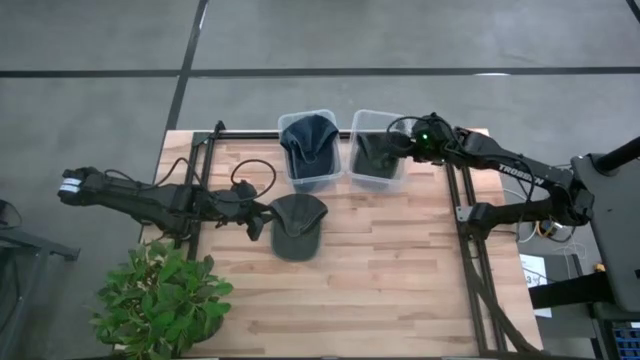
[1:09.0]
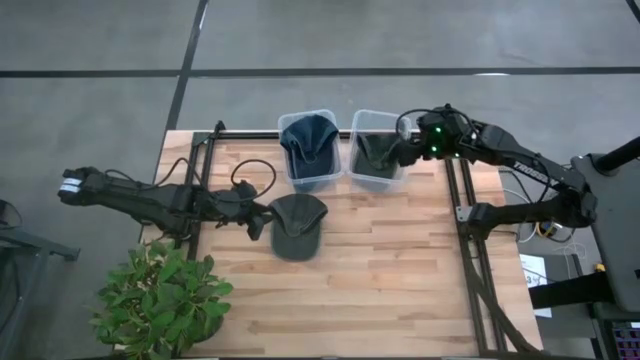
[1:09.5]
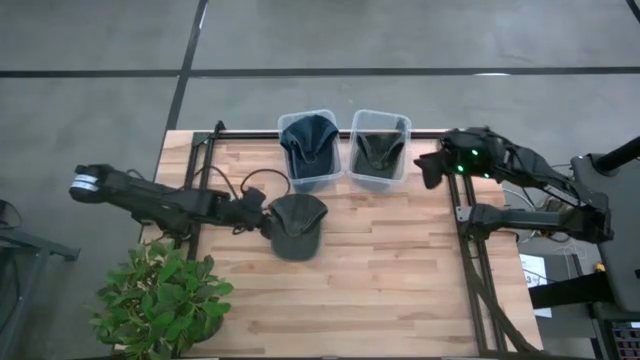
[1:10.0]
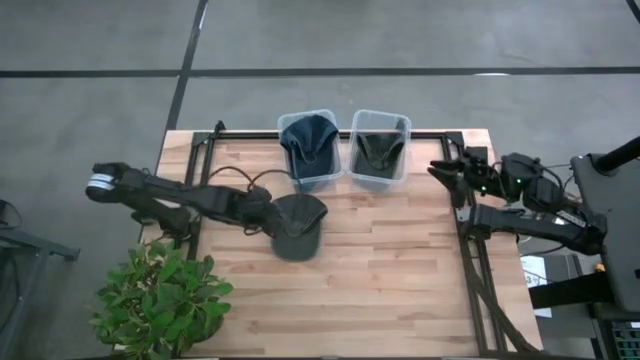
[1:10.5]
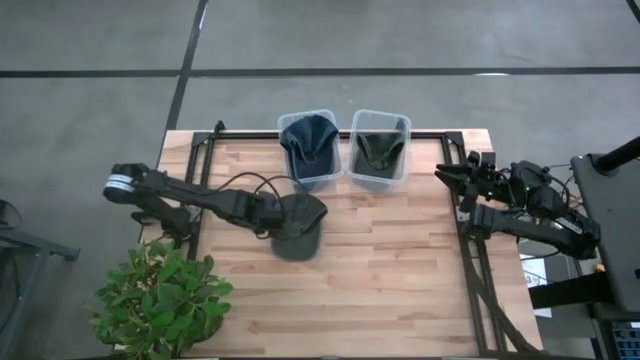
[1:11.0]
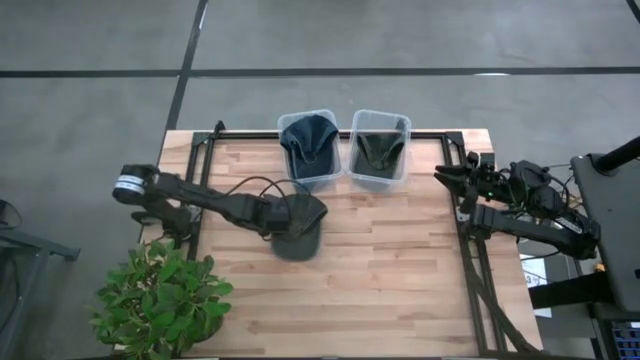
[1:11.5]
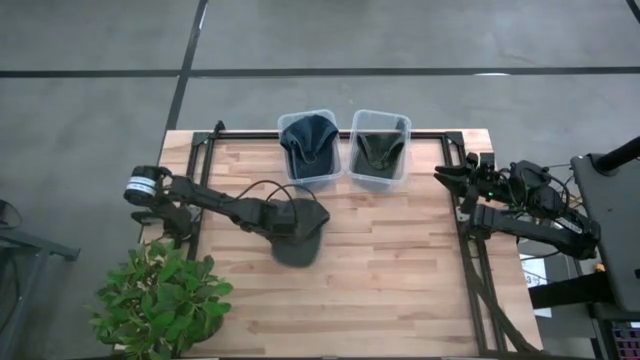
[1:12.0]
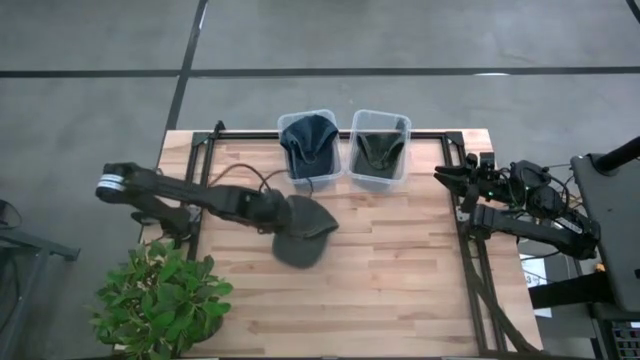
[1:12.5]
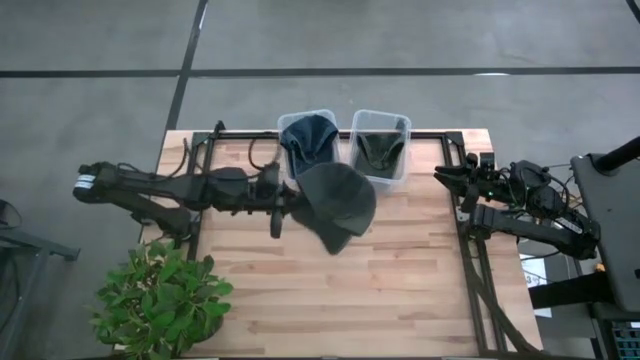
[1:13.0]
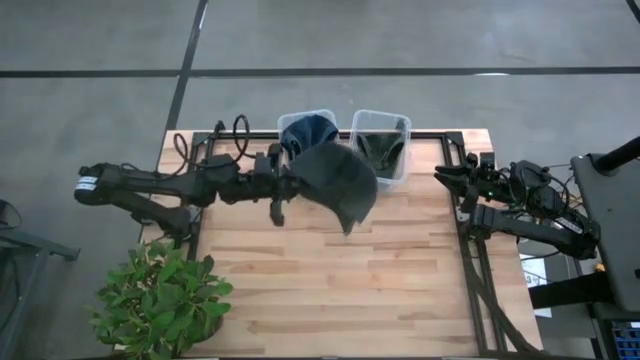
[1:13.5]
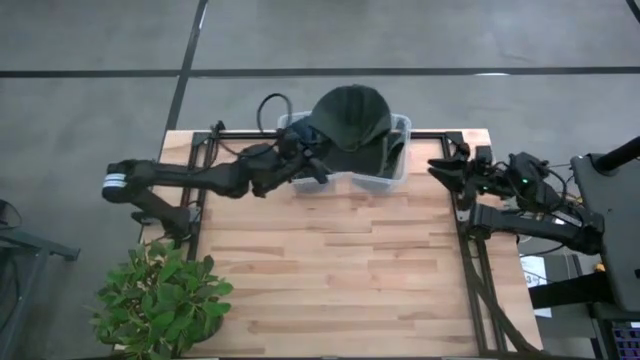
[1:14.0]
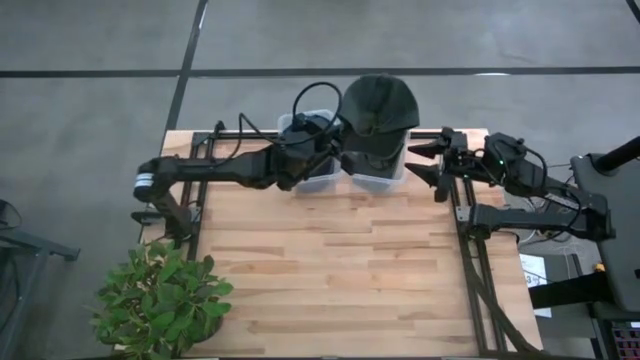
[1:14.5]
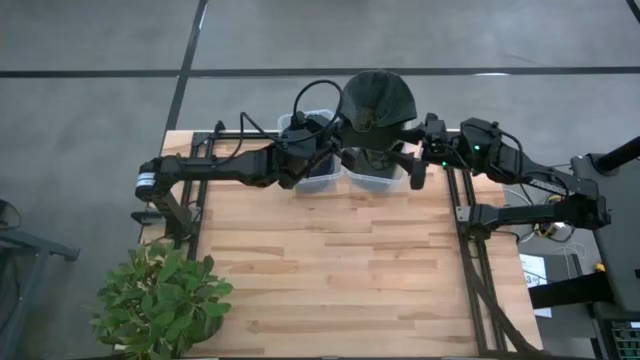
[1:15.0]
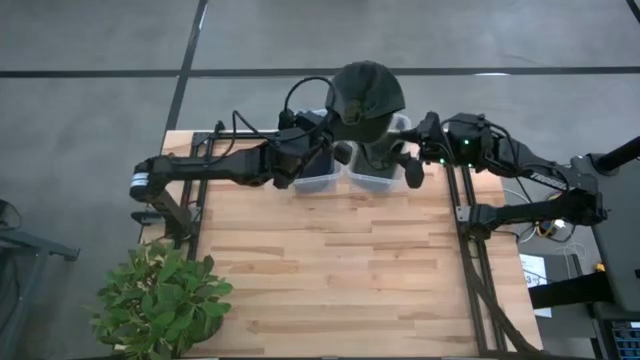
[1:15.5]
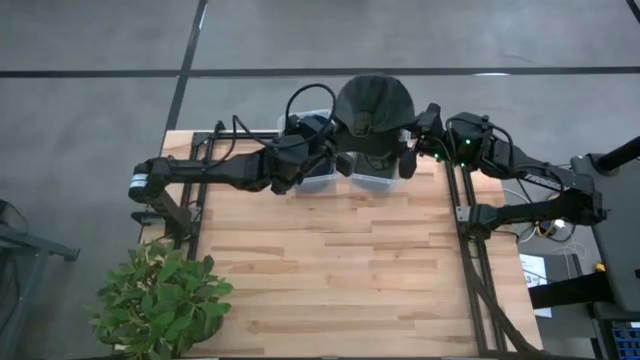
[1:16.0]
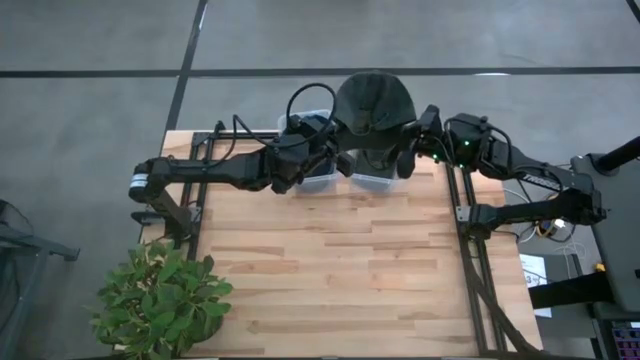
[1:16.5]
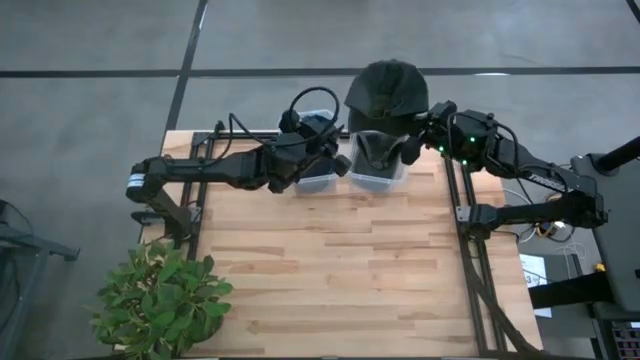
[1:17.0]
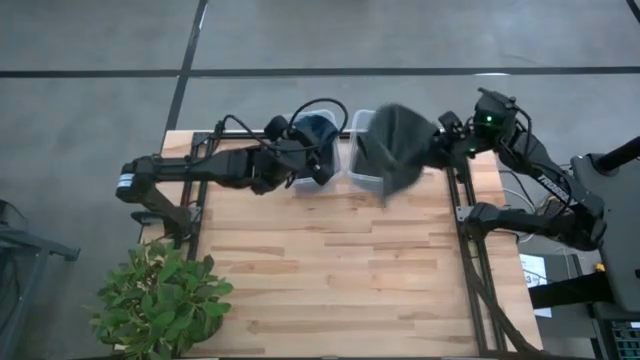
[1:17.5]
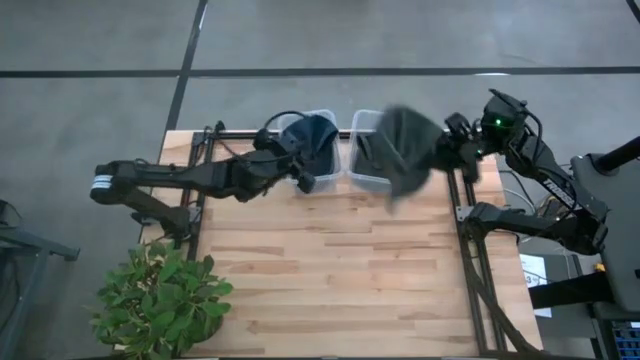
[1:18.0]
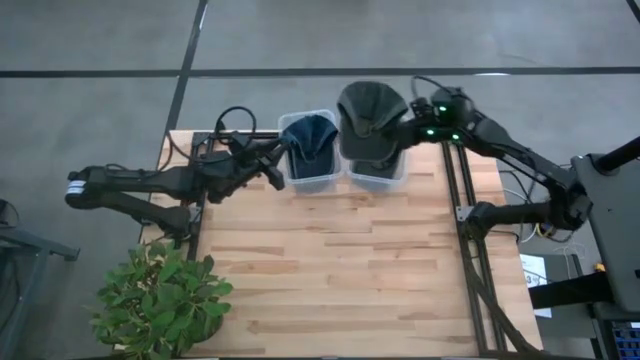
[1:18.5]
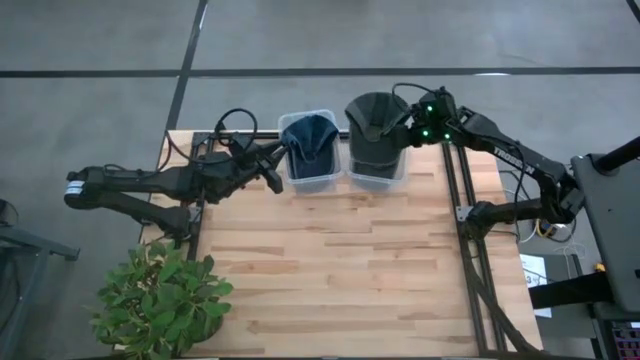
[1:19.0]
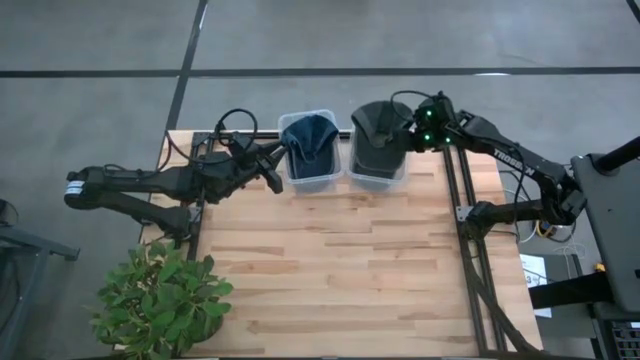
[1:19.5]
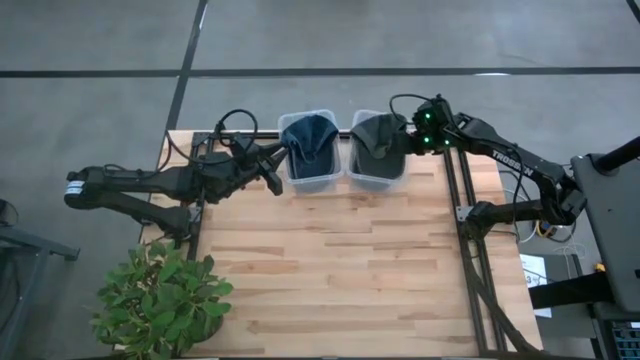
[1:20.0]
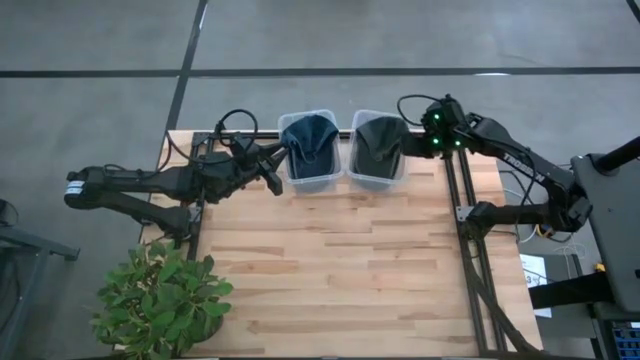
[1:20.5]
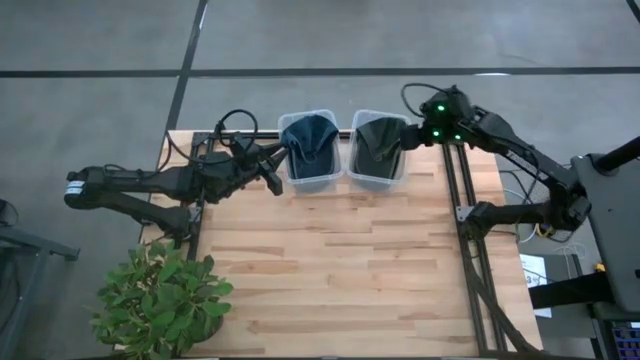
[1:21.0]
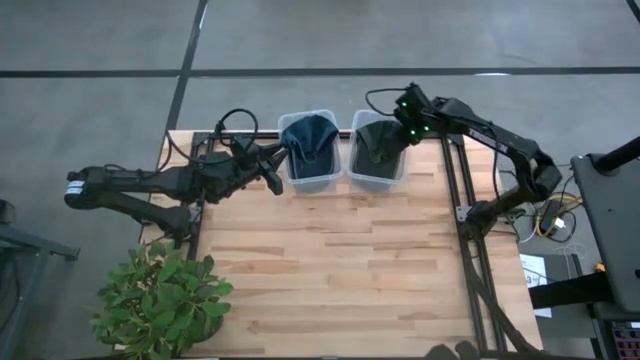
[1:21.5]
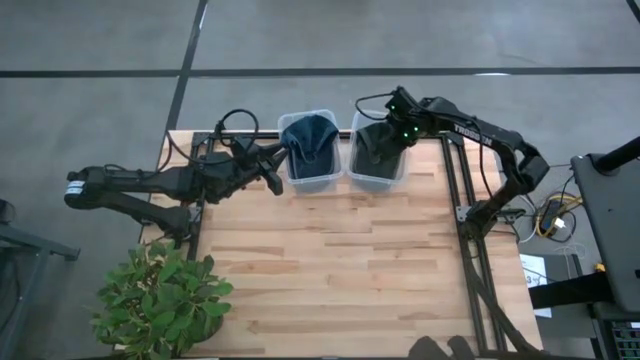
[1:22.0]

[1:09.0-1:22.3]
Task: Pick & Place hat
Put the gray cap into the transparent bin

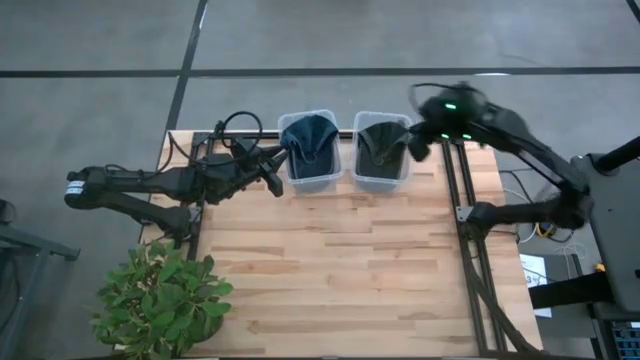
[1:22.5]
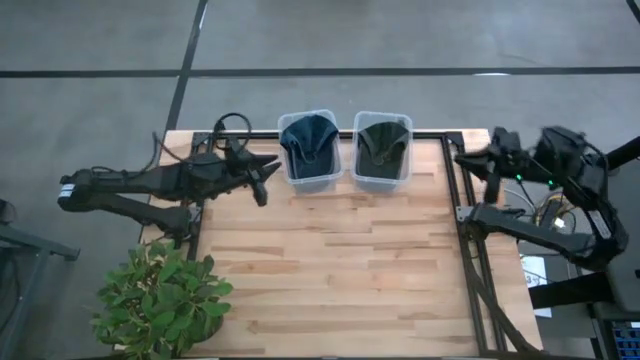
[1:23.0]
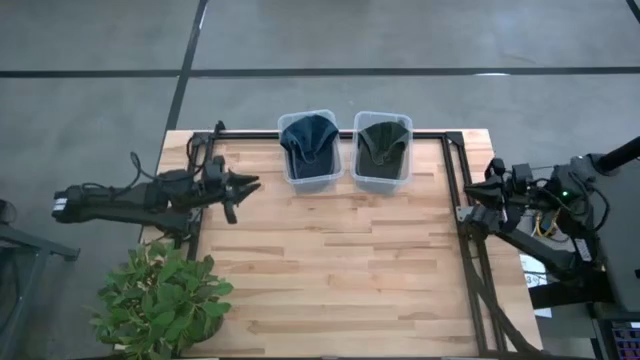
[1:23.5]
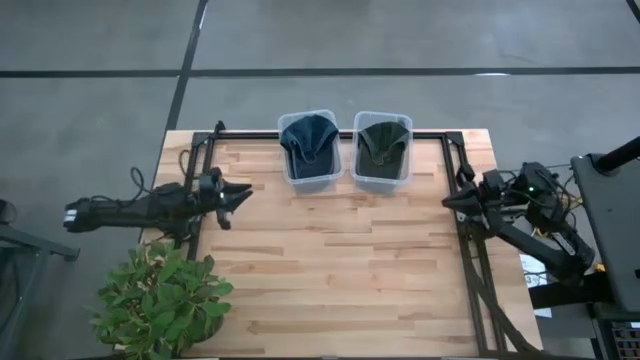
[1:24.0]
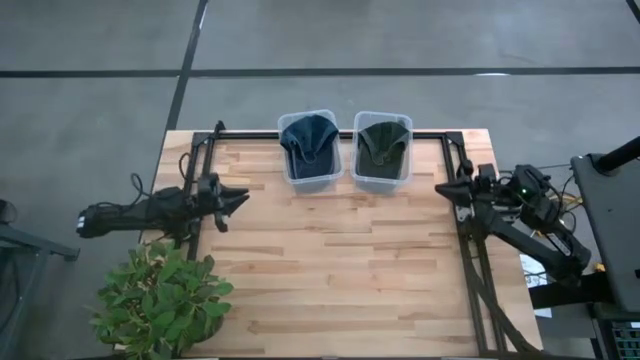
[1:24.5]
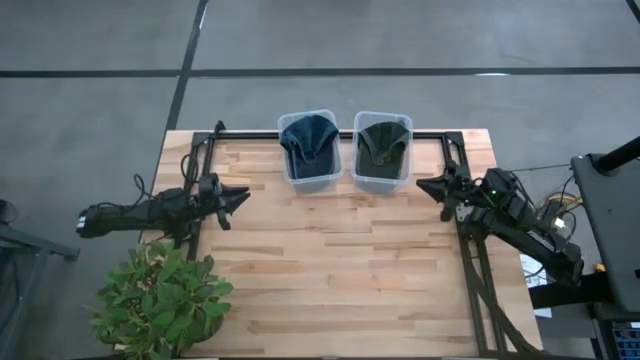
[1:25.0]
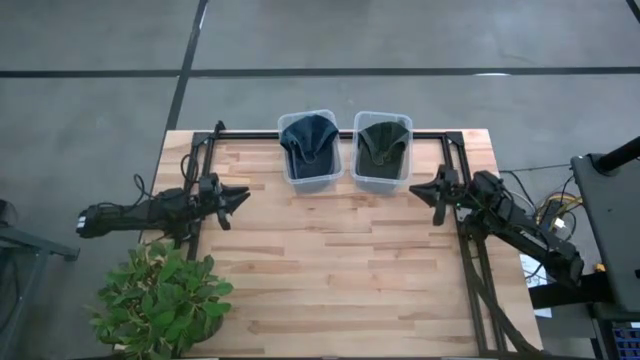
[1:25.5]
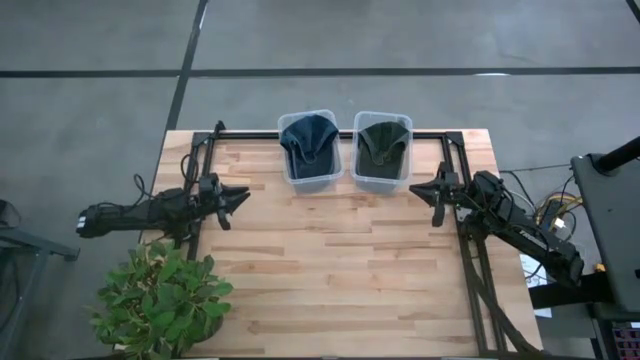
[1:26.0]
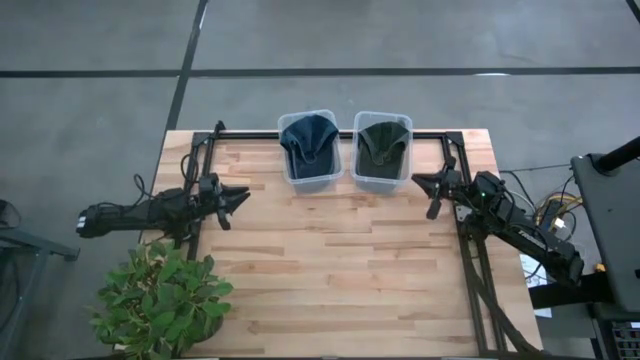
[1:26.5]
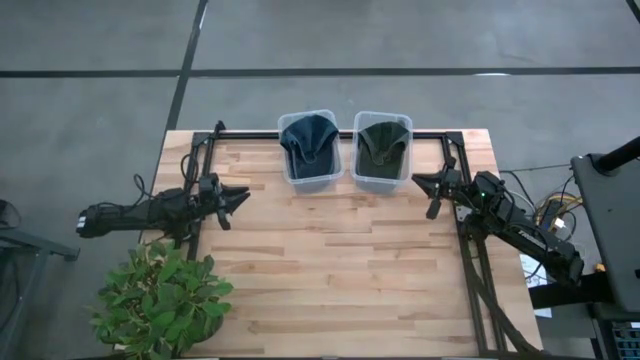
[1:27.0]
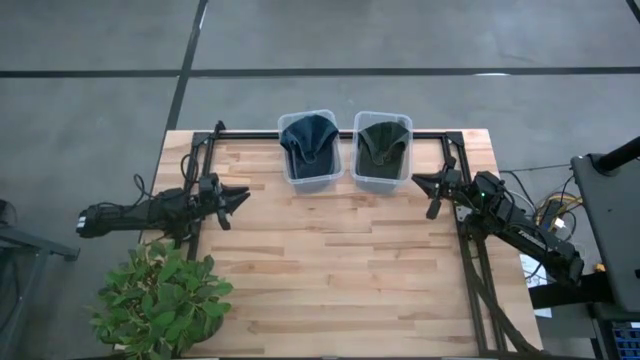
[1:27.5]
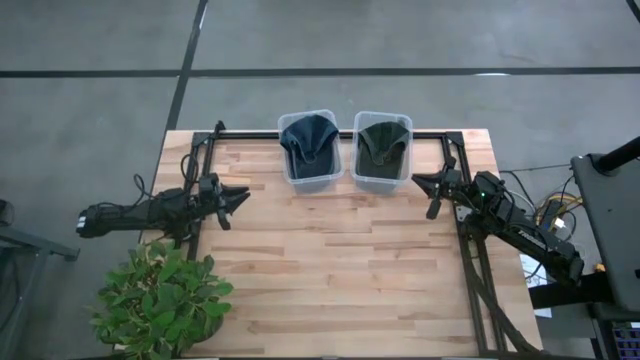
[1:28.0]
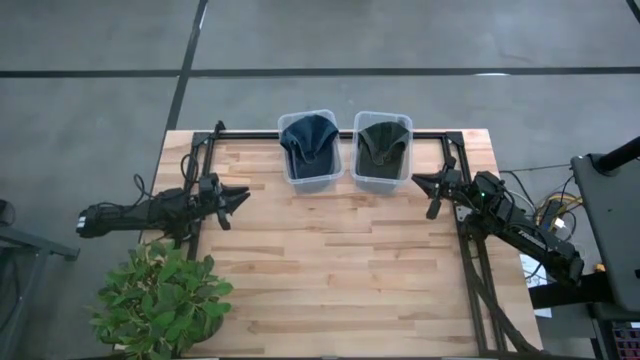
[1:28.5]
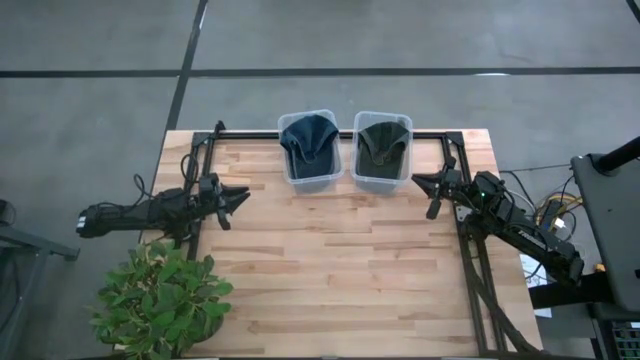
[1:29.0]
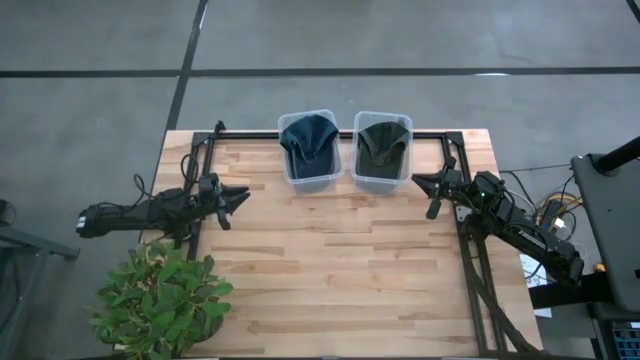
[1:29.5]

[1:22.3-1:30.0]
Return to Home Position

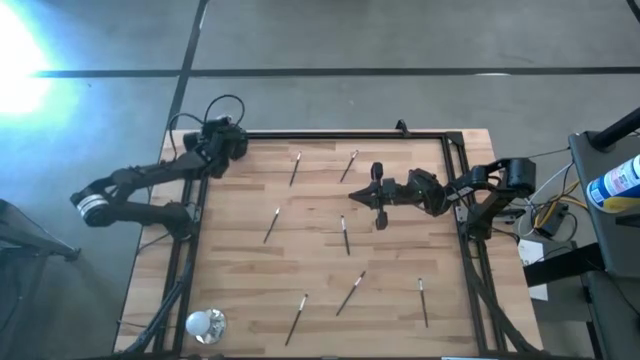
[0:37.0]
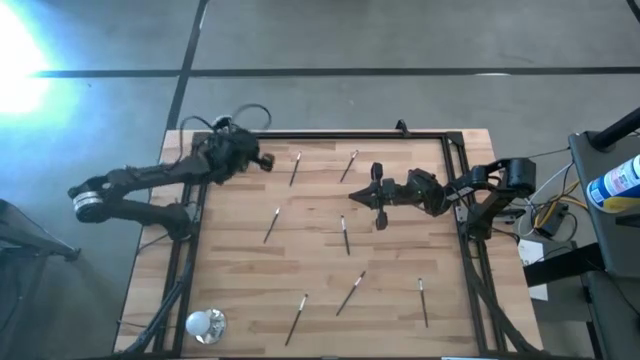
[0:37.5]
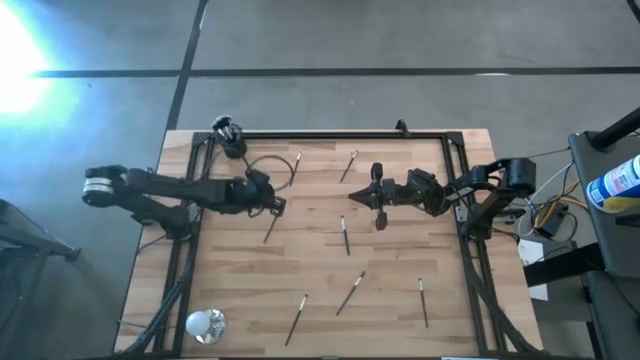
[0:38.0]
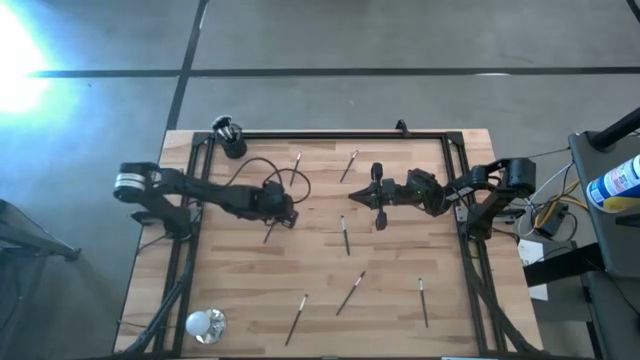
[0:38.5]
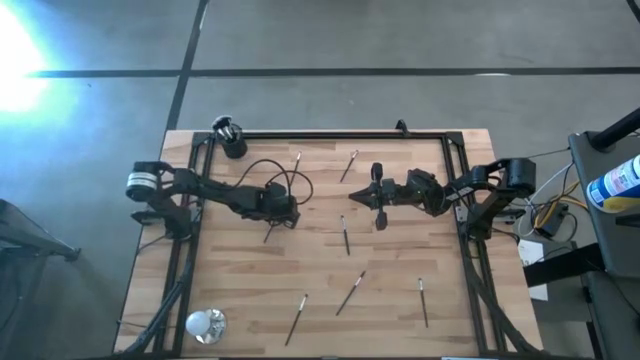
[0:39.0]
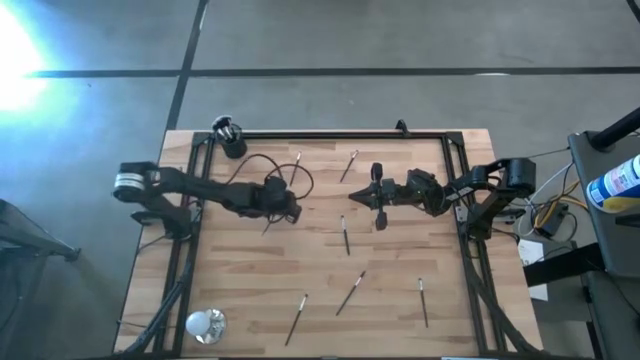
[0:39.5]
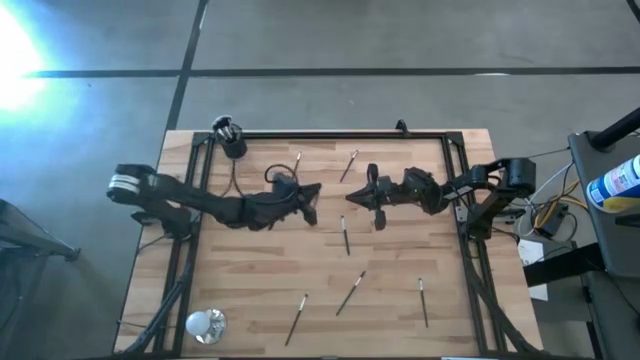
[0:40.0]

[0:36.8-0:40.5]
Task: Put items in baskets/containers
Put the black liner brush into the black pen holder
